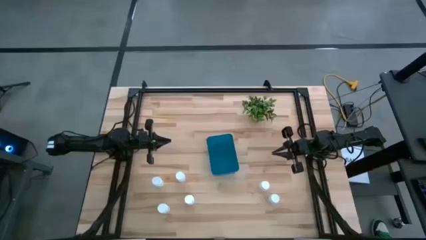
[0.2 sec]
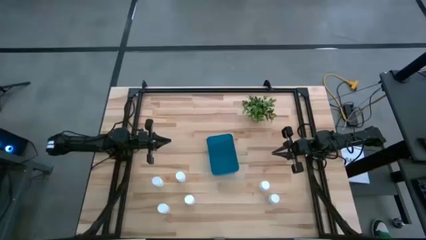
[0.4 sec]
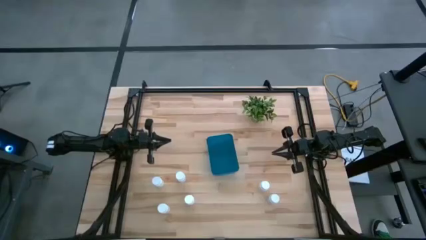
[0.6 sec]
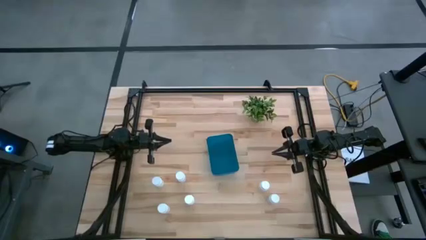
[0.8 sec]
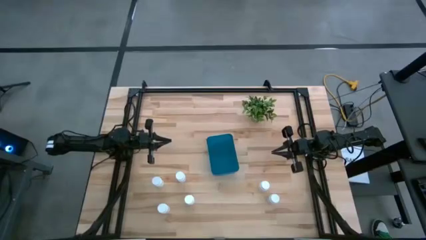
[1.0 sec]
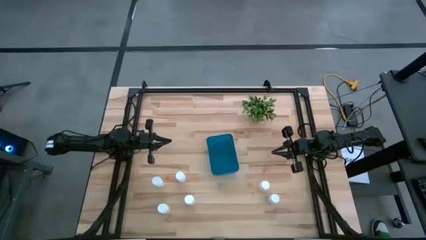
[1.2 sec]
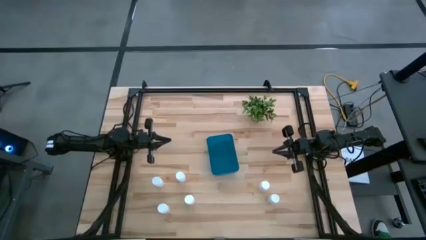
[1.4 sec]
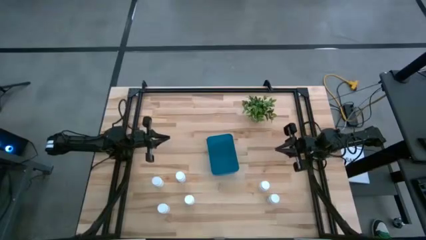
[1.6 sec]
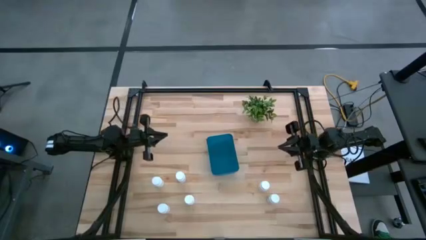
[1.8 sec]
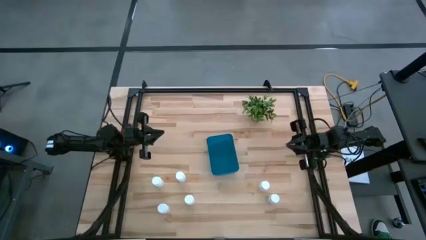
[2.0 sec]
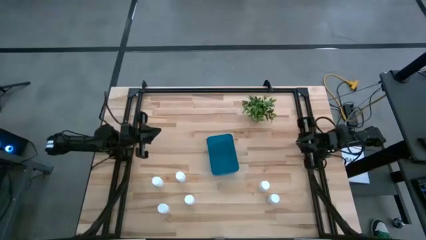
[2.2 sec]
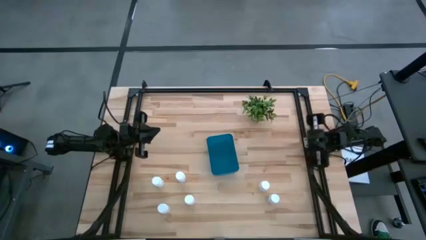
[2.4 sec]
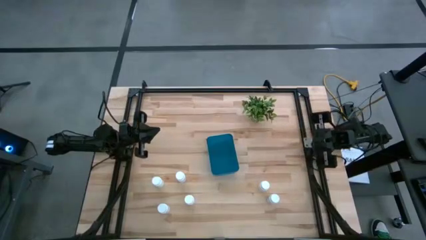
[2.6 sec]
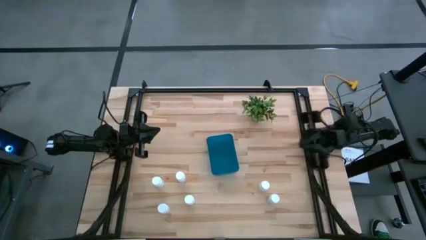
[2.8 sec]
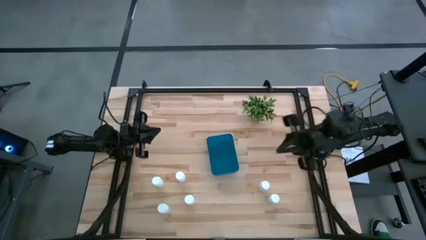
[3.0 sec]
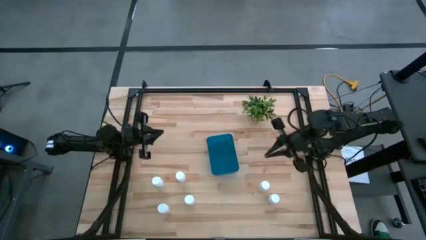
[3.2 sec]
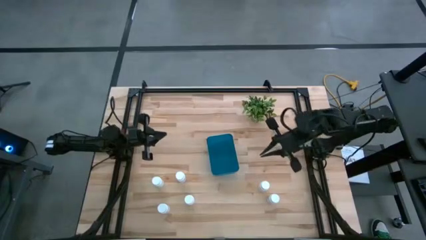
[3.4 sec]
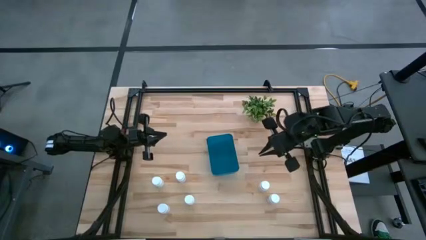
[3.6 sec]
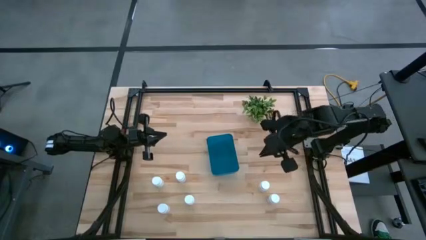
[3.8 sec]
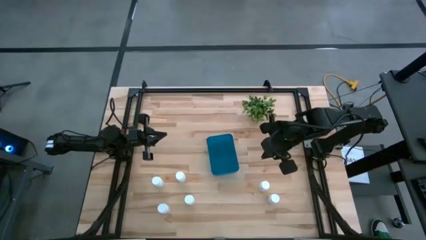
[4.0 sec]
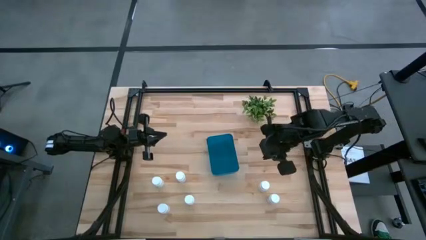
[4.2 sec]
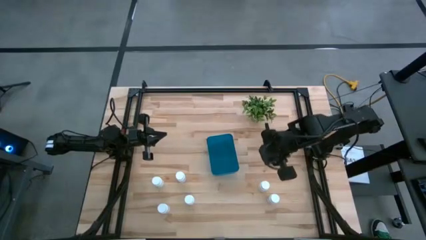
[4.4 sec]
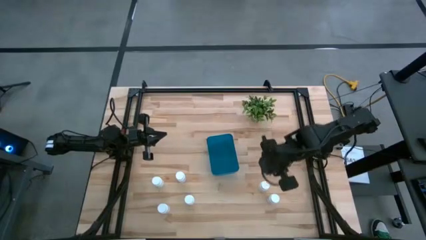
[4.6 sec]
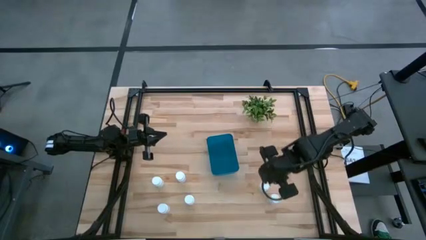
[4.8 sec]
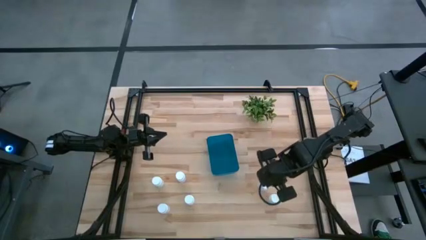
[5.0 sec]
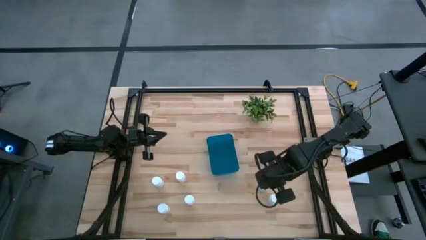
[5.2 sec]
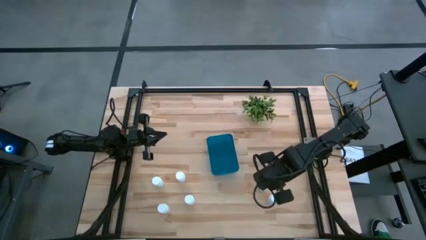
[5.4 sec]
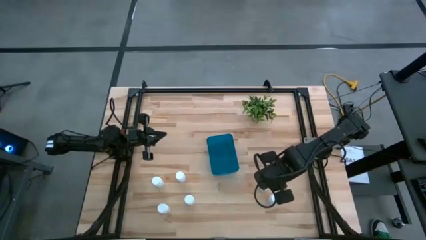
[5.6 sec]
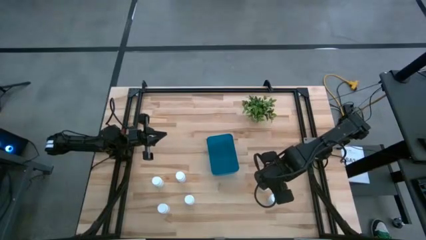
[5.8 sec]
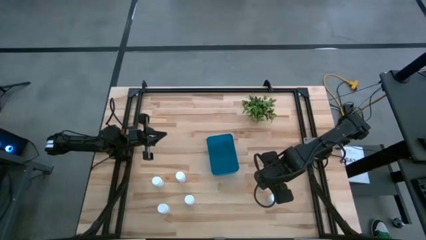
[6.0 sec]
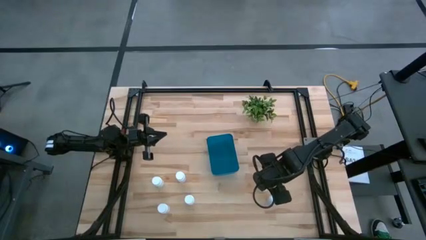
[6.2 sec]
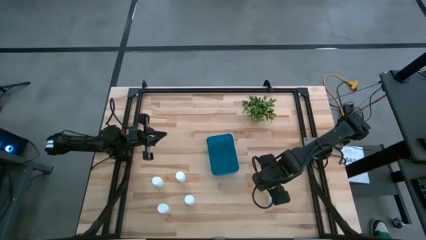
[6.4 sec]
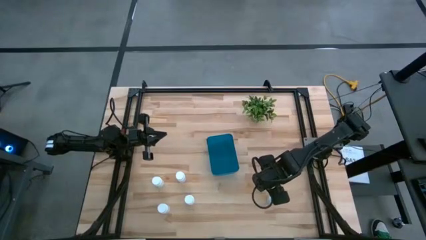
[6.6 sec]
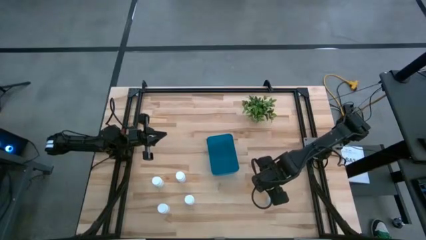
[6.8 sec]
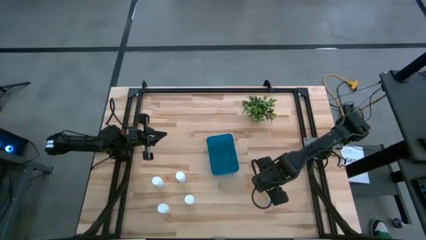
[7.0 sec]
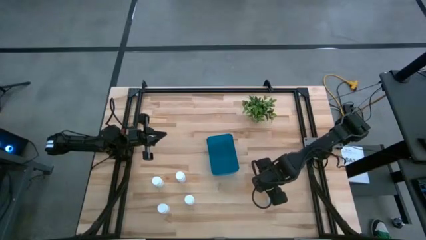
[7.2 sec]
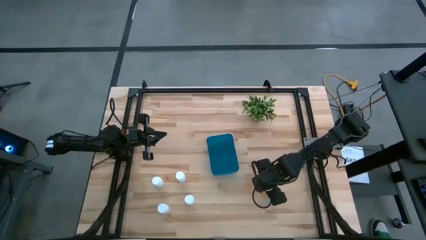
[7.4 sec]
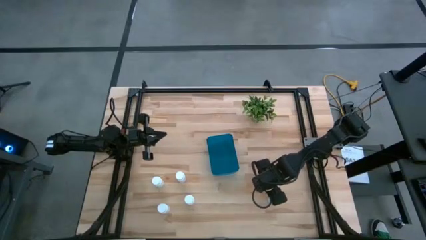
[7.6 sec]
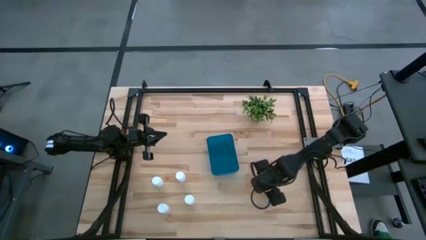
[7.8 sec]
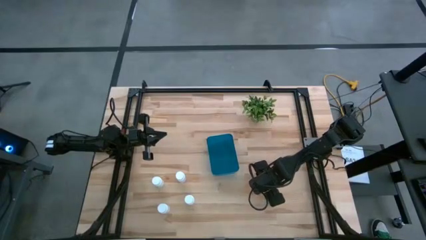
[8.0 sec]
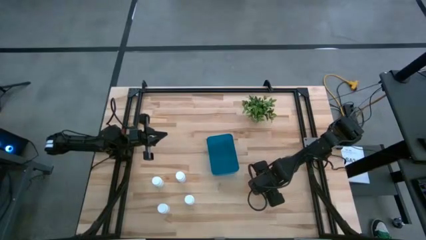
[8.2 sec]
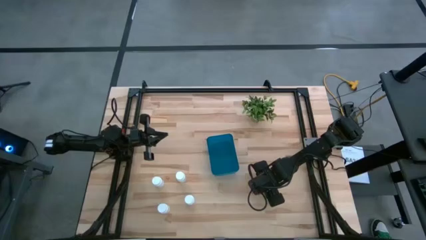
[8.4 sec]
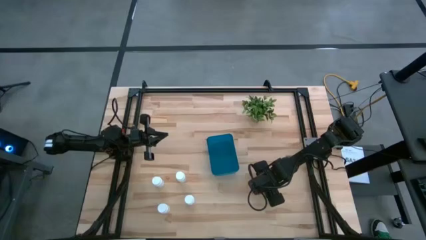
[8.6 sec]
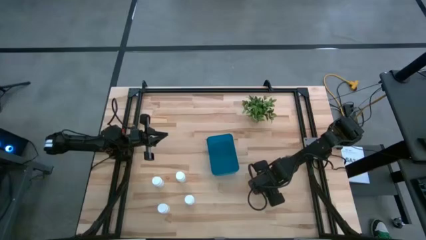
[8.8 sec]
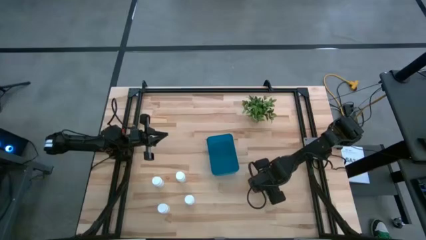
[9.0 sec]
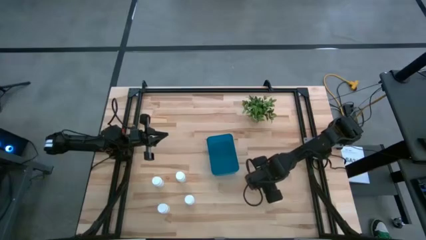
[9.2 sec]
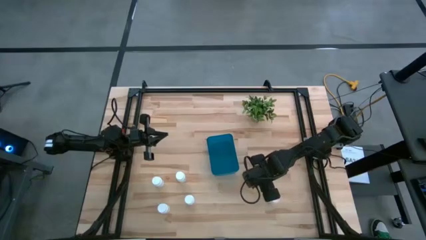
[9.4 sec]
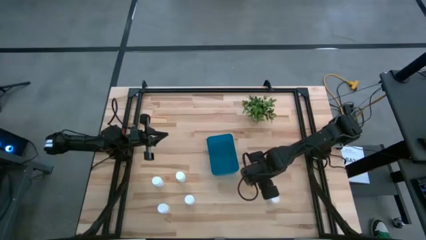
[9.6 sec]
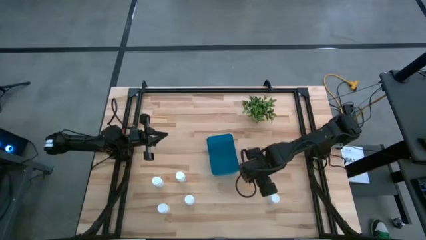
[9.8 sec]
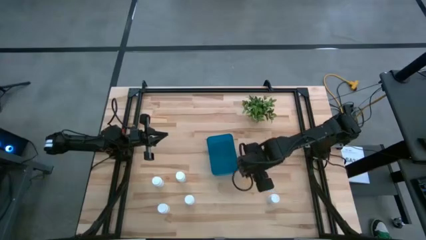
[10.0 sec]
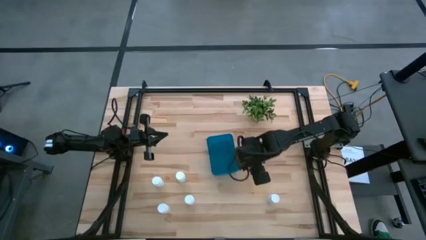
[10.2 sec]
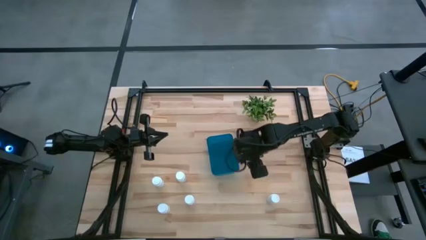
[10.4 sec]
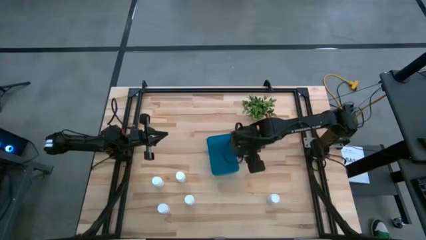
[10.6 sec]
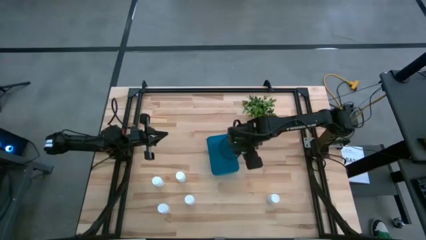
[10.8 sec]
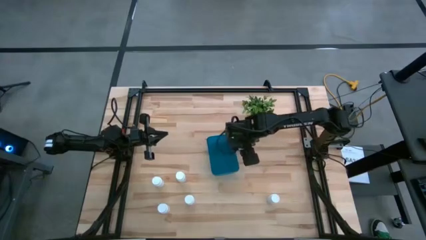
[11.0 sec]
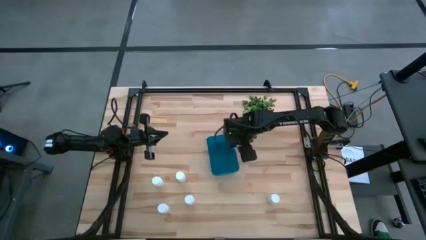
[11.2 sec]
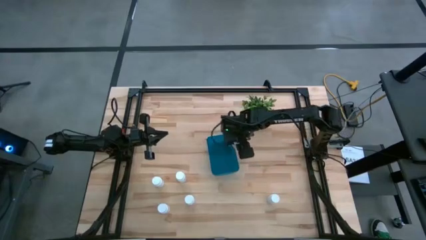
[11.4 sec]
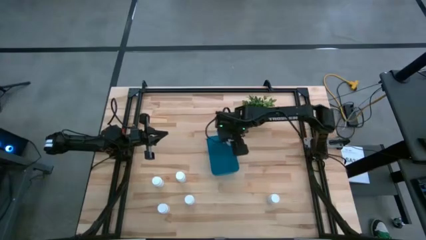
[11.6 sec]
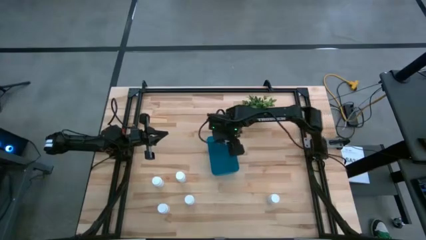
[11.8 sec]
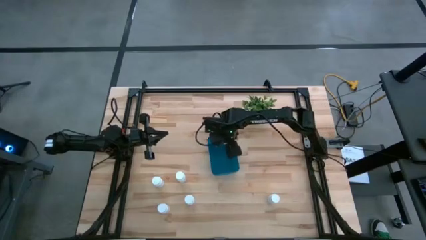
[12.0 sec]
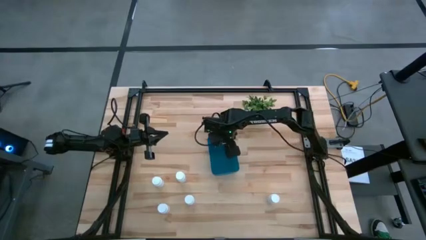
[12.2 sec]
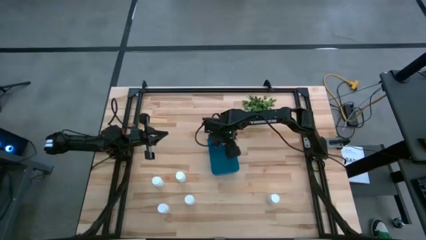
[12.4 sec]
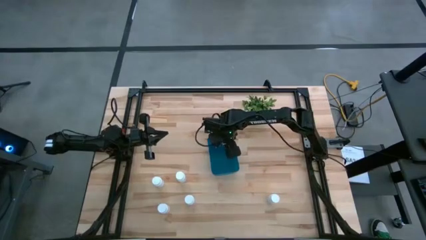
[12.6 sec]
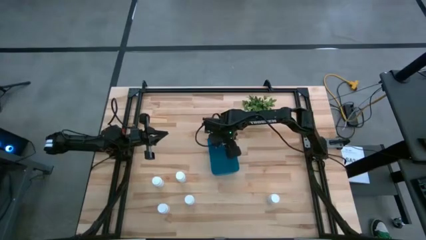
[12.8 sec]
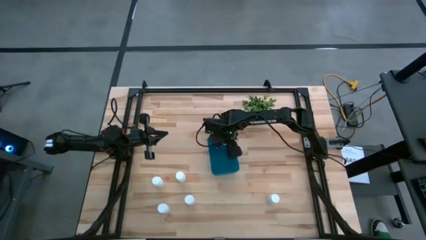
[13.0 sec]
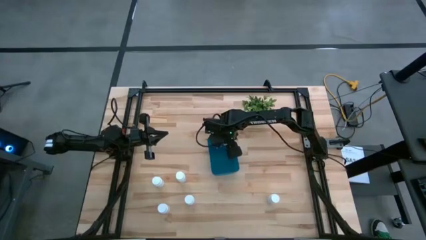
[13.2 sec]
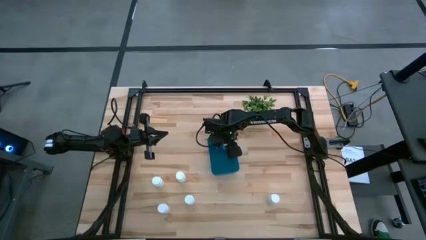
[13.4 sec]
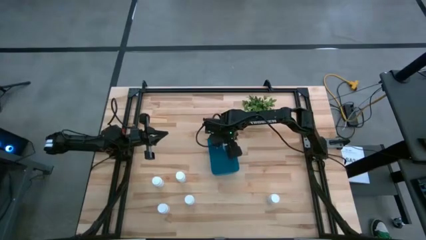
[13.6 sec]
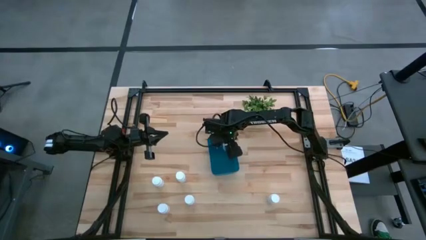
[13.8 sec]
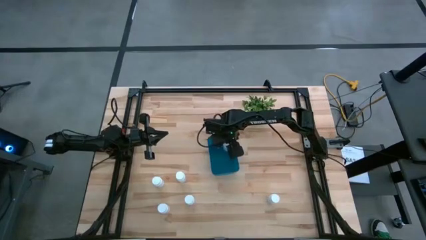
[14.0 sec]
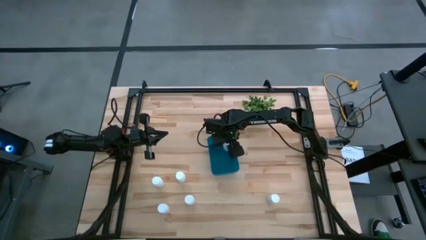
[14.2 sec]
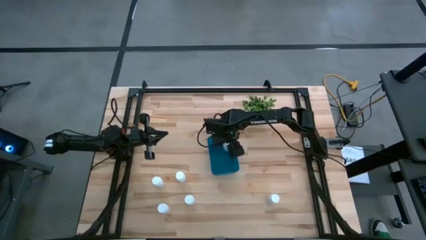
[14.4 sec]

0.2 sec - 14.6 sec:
Task: Pick and place pill bottles into a basket
Put the white pill bottle into the blue bin
